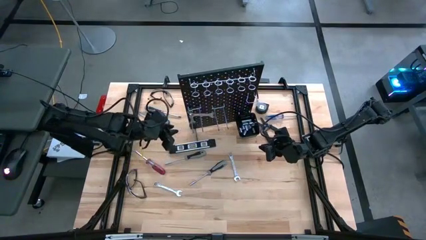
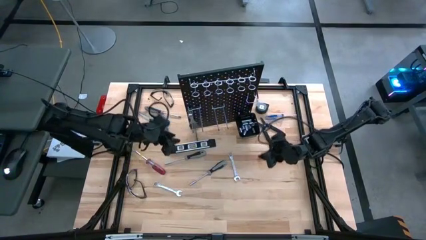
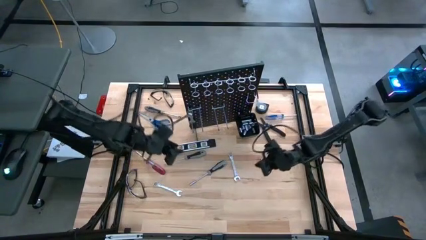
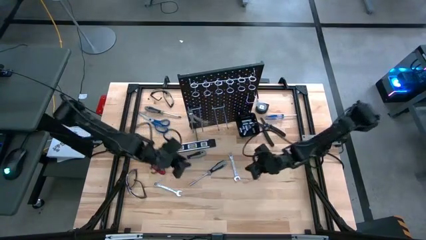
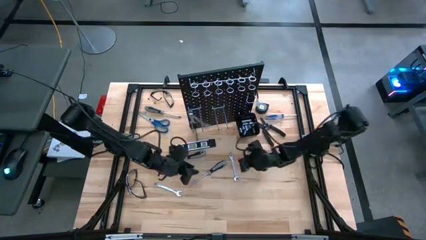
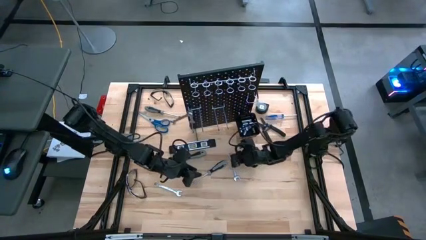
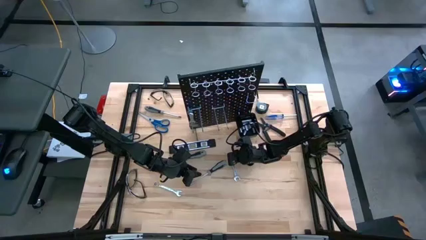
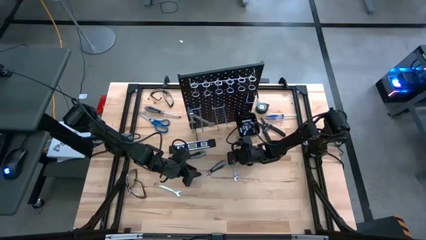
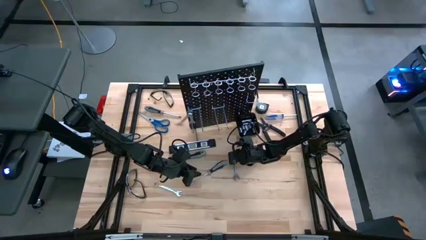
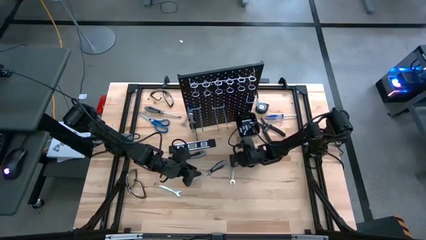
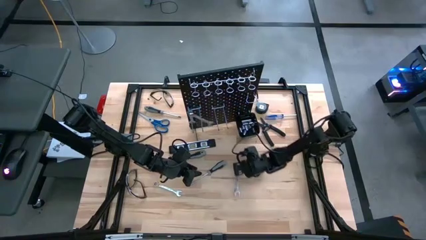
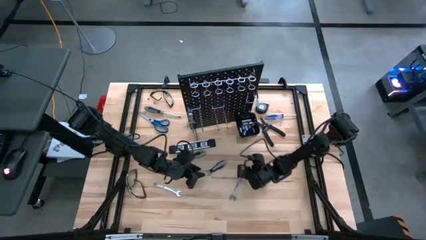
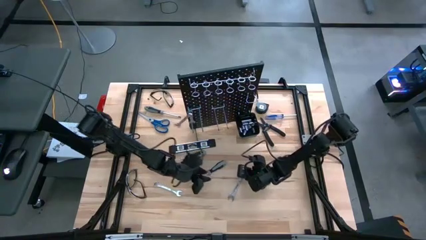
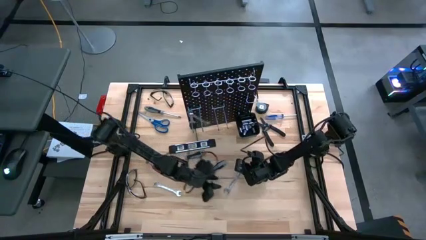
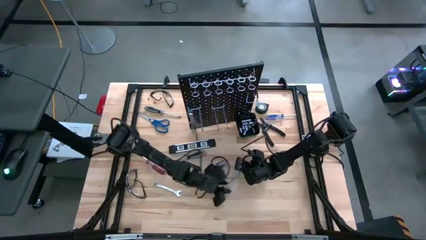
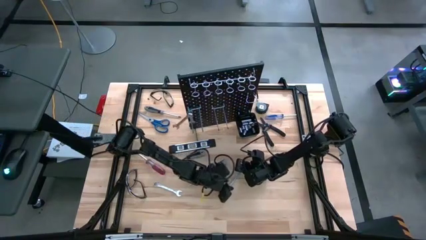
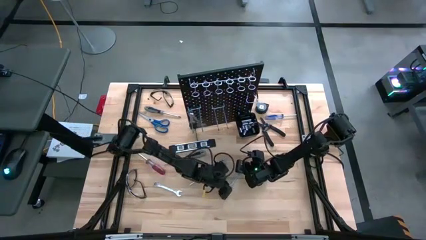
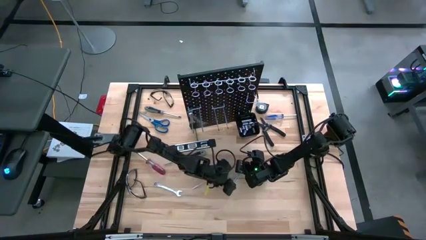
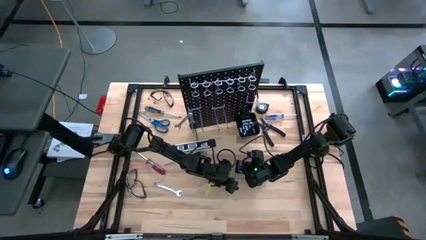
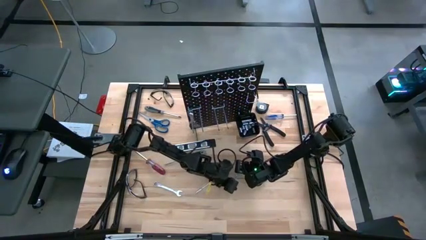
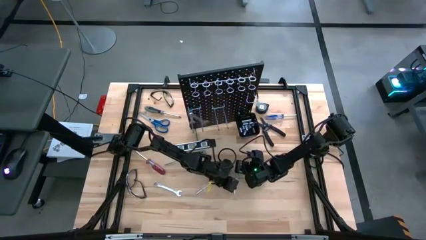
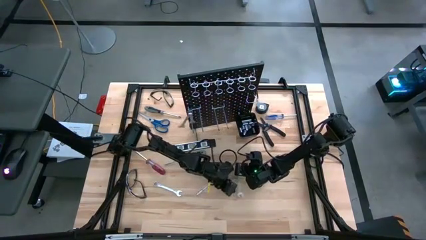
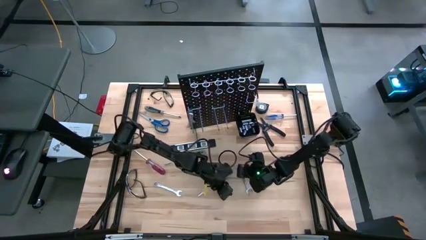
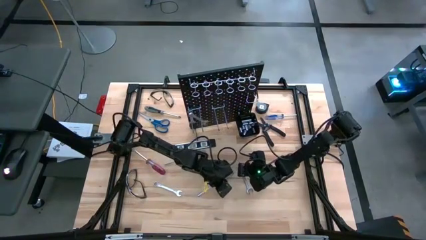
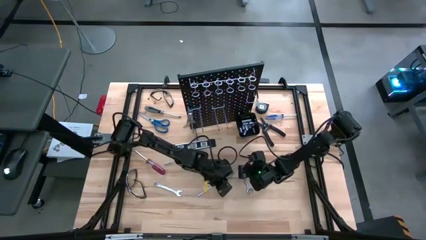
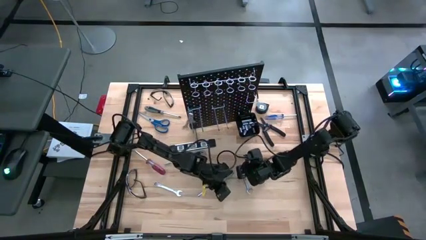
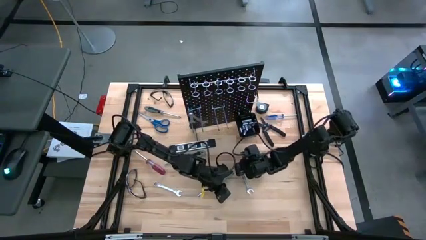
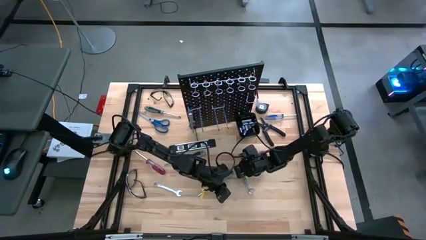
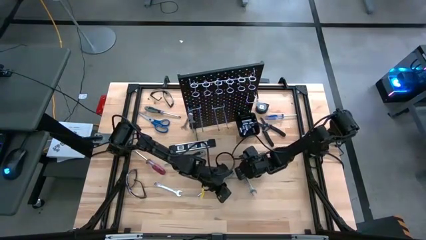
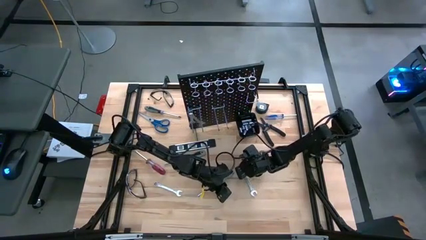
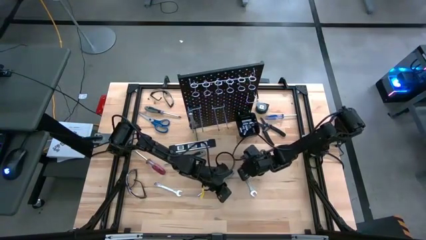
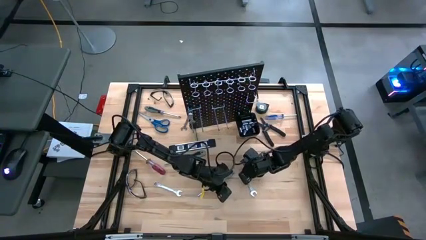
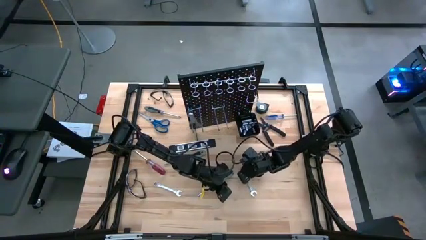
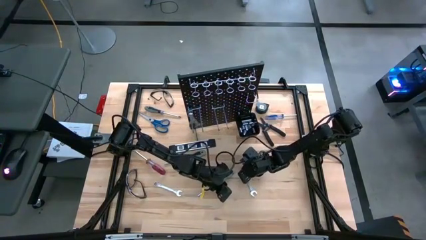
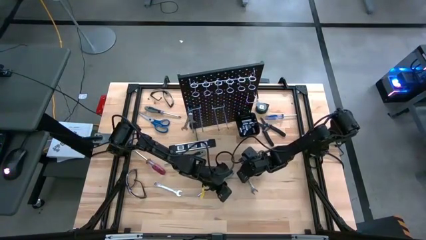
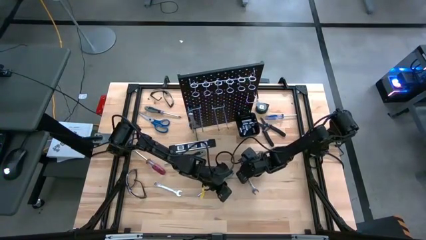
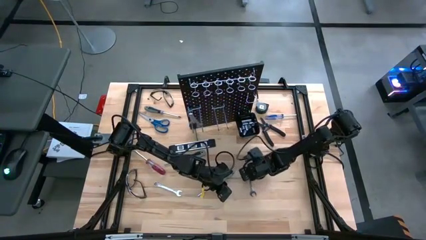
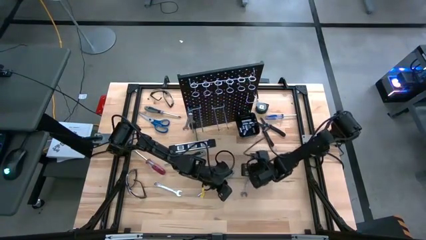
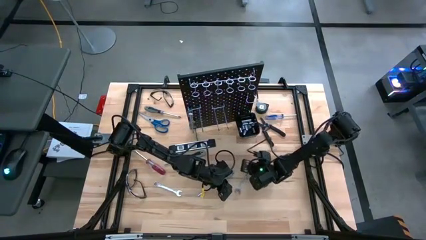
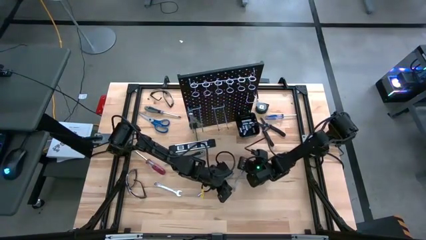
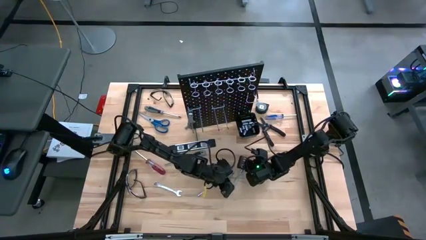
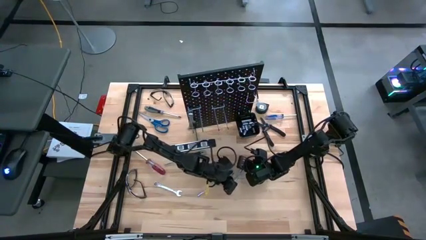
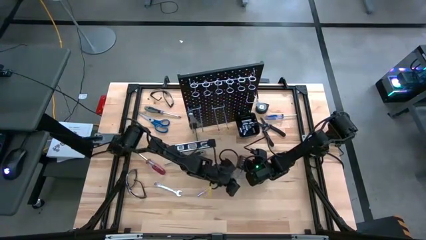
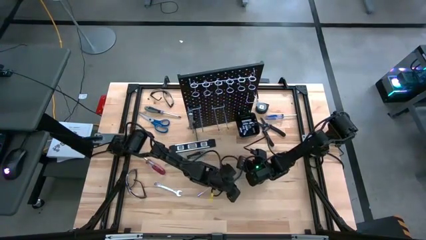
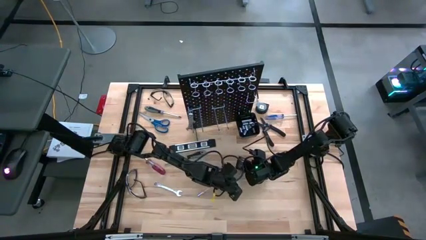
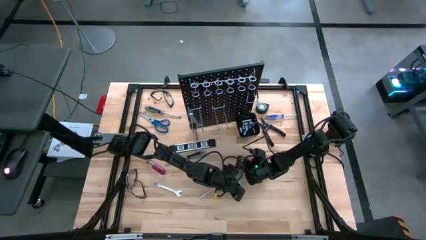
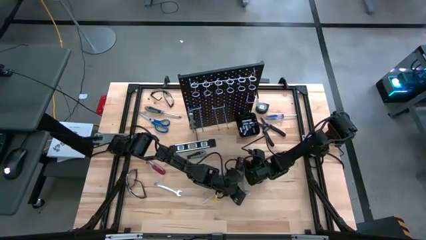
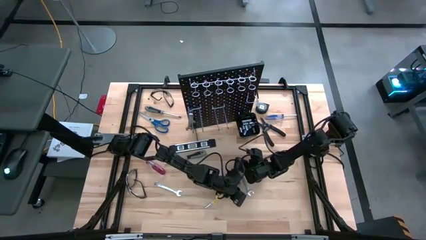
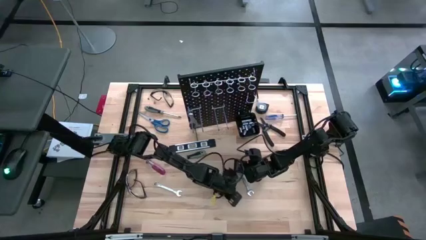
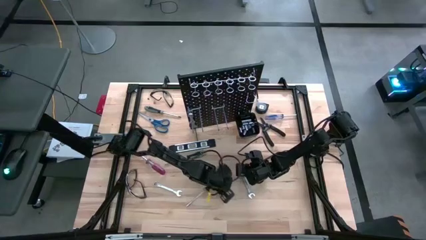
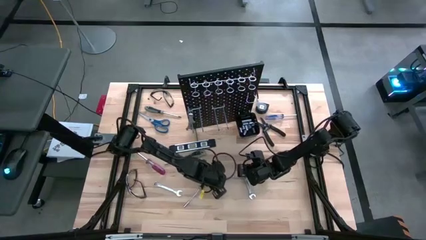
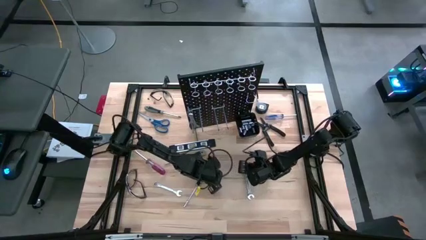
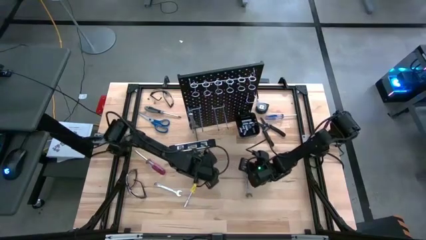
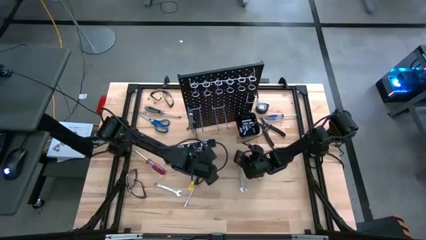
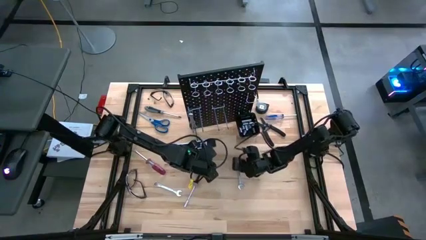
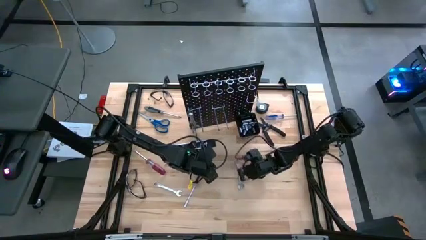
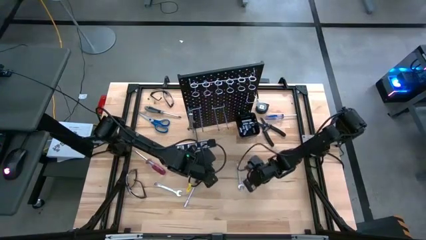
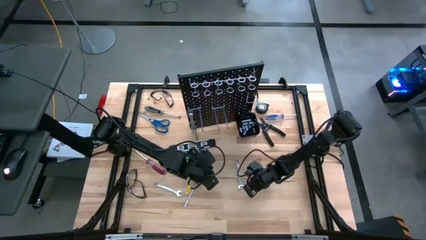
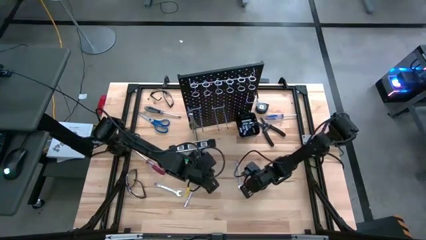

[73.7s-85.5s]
Task: Hang tools onto peg board
Hang the silver wrench on the pegboard

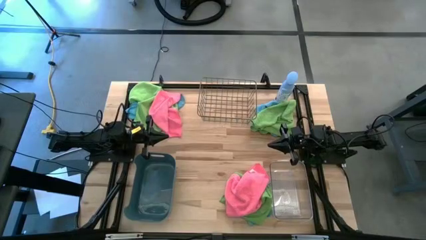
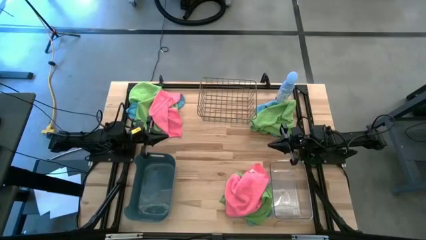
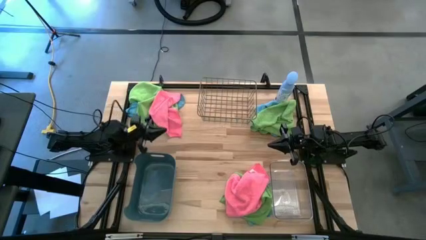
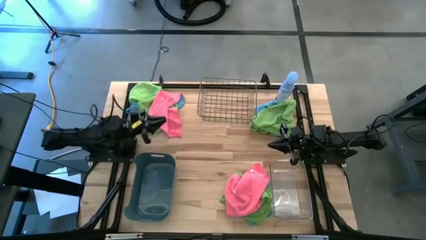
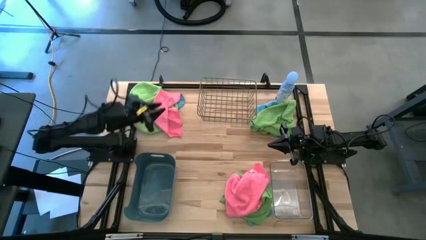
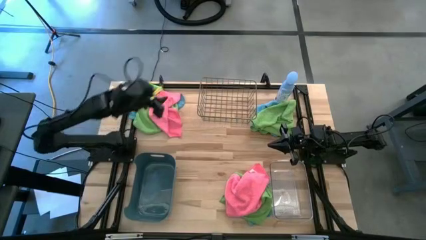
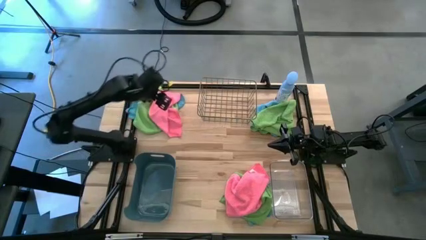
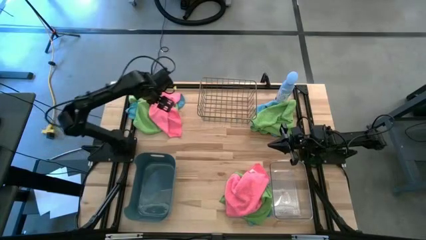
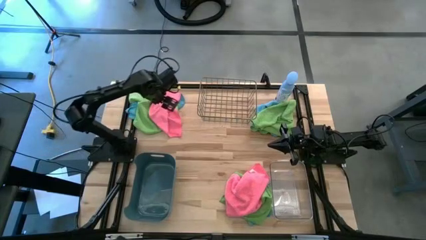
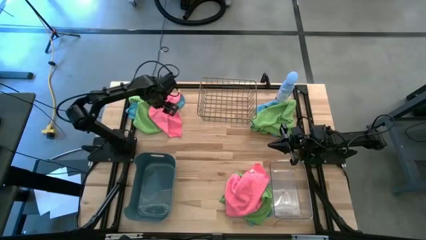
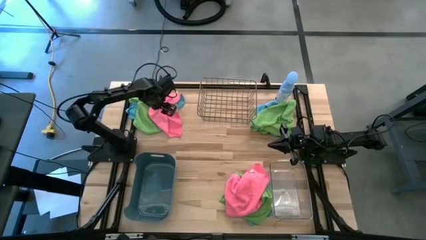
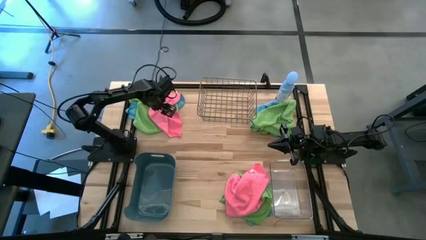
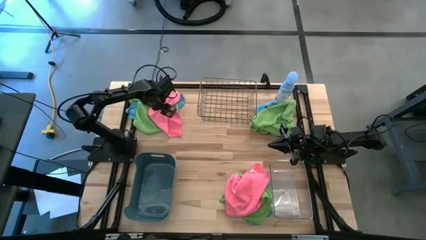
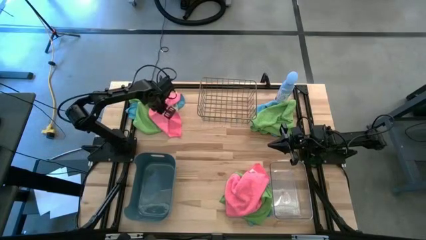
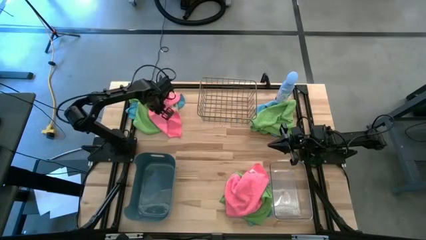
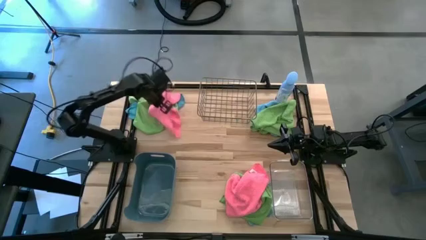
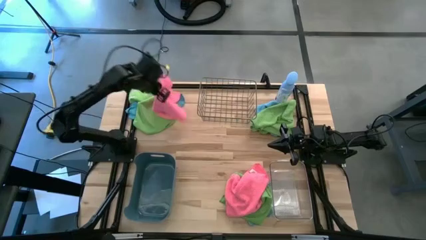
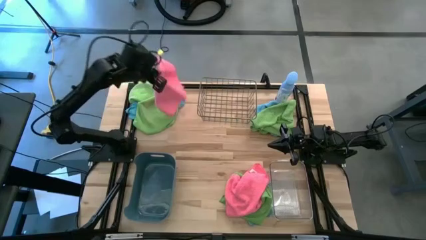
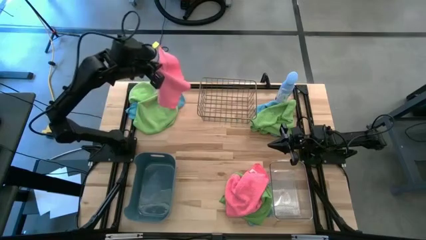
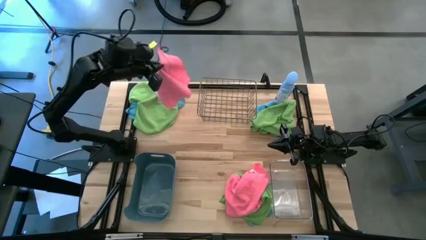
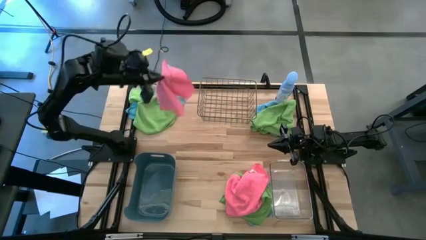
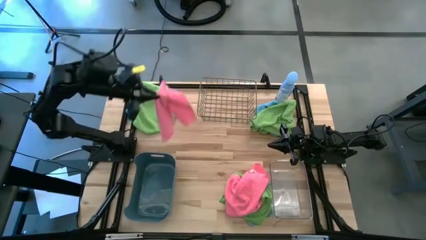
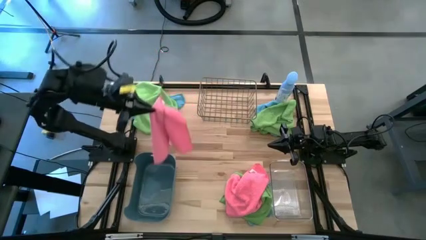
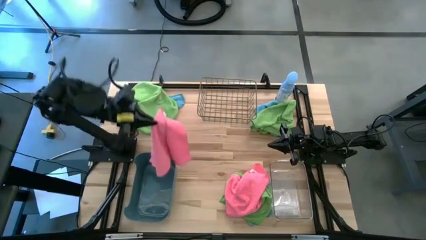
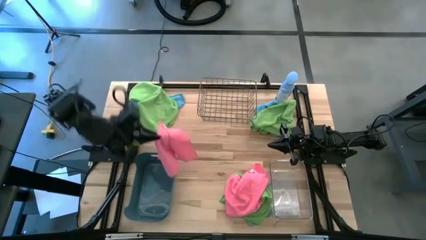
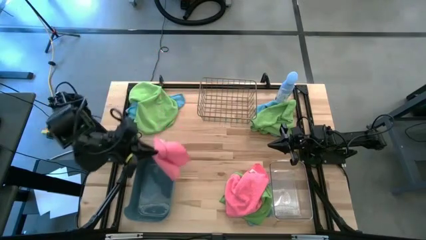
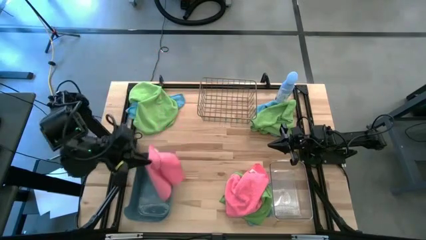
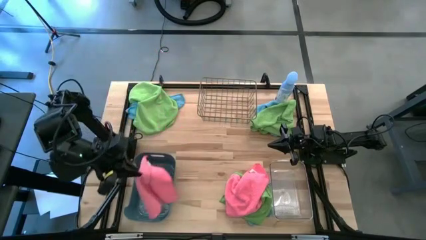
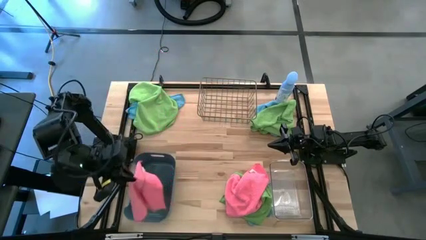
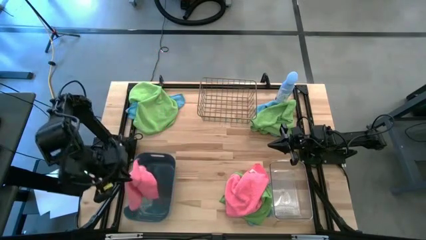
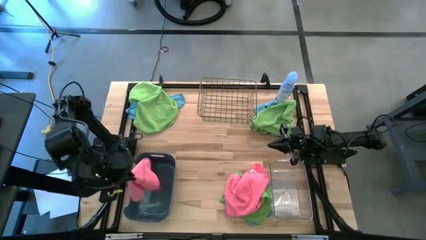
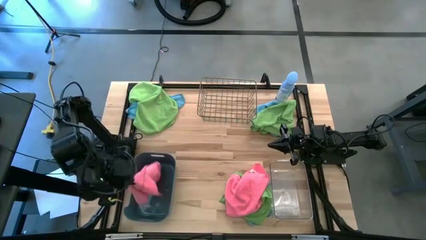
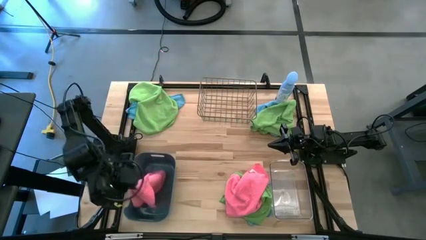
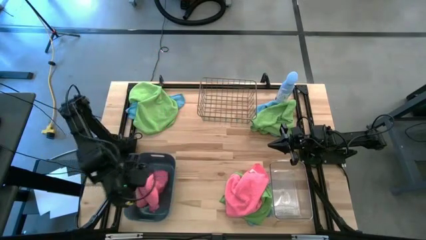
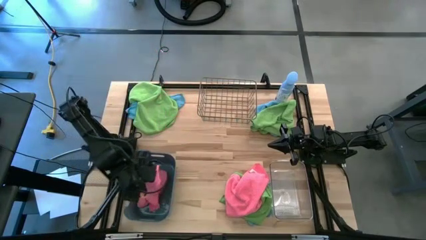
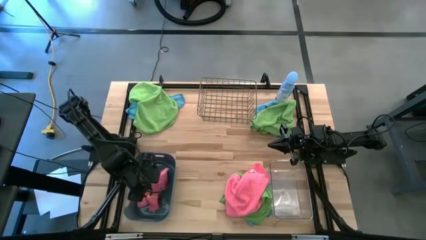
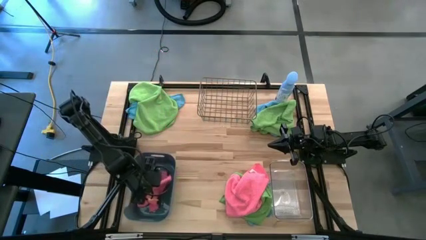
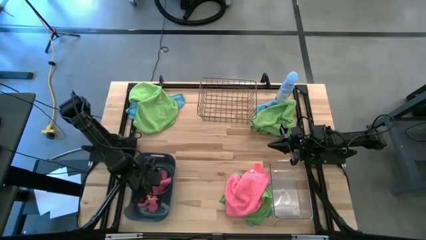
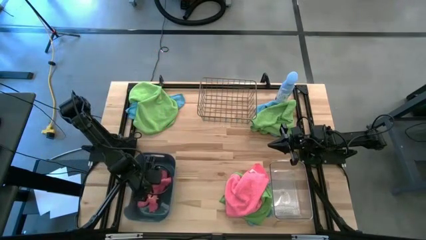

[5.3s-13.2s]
Task: Sort microfiber towel by color & place in baskets
Put the top pink towel into the blue bin
